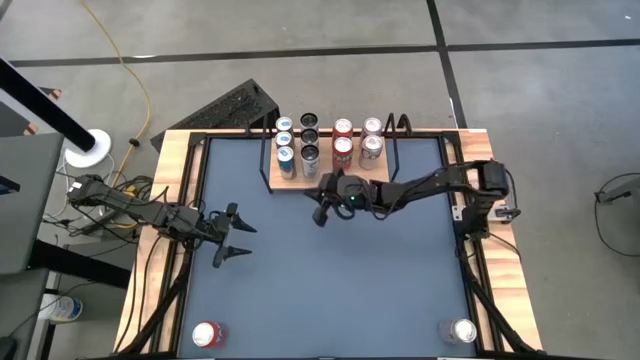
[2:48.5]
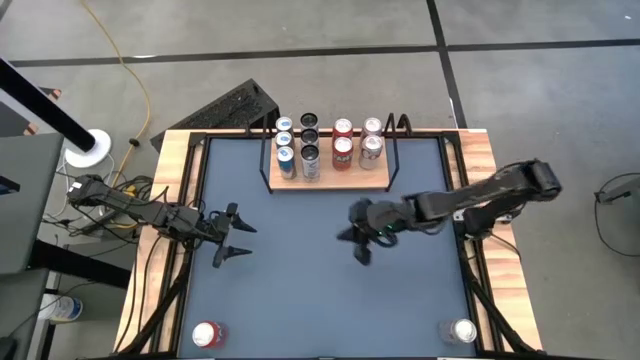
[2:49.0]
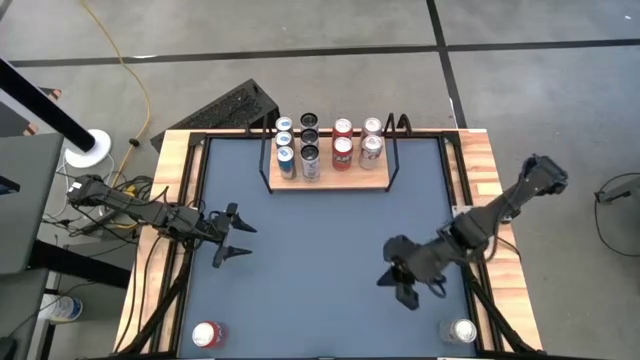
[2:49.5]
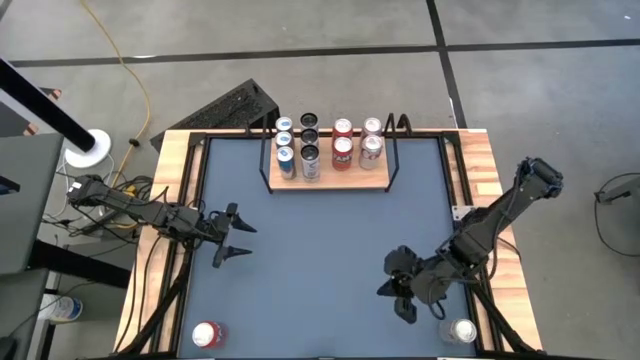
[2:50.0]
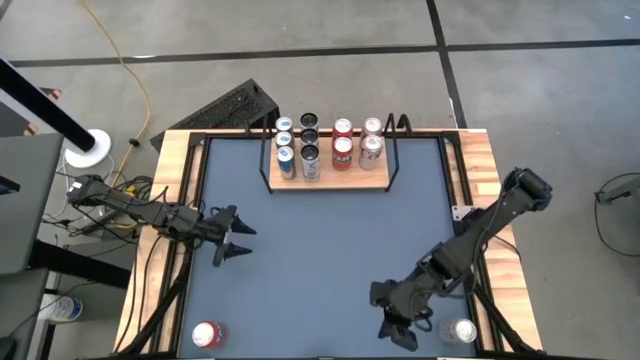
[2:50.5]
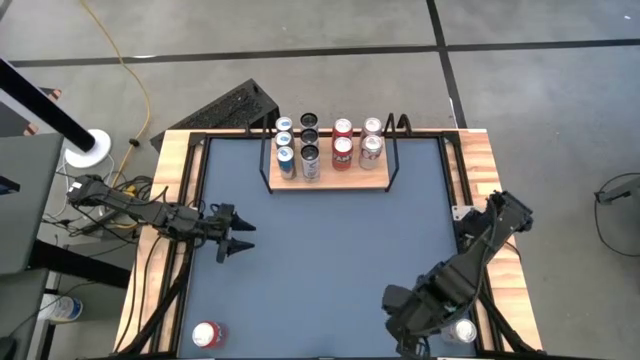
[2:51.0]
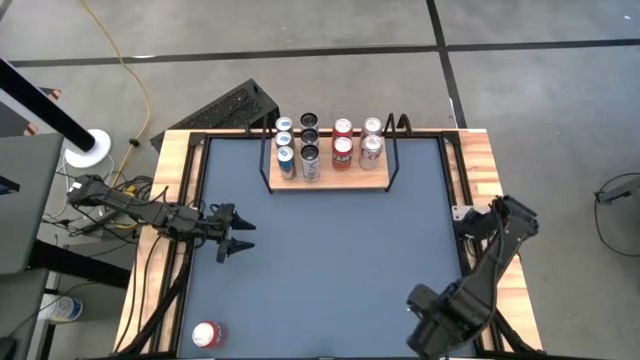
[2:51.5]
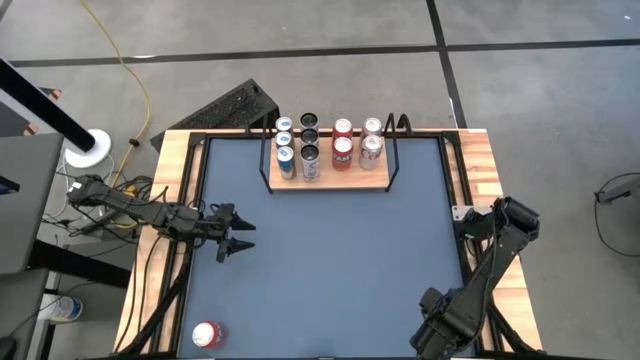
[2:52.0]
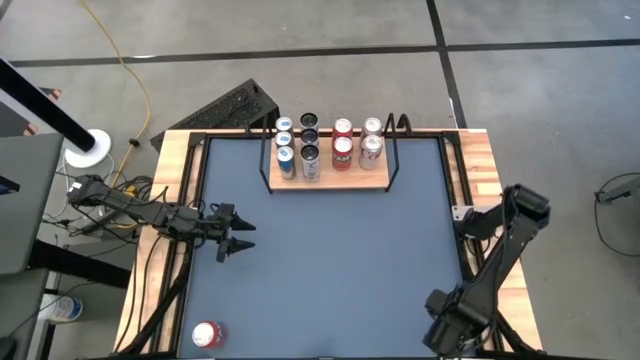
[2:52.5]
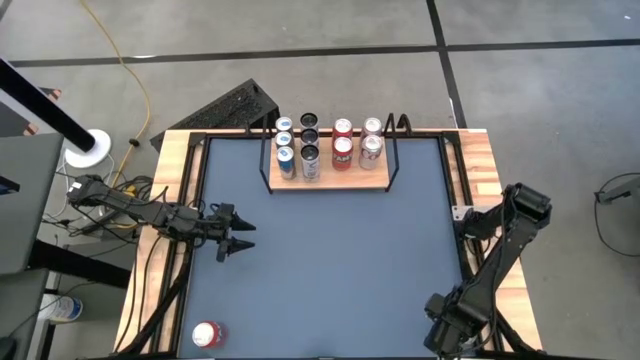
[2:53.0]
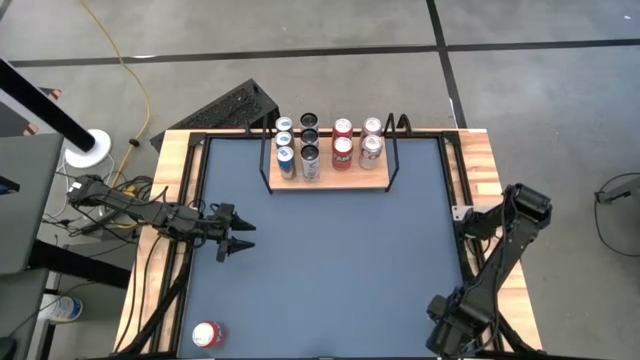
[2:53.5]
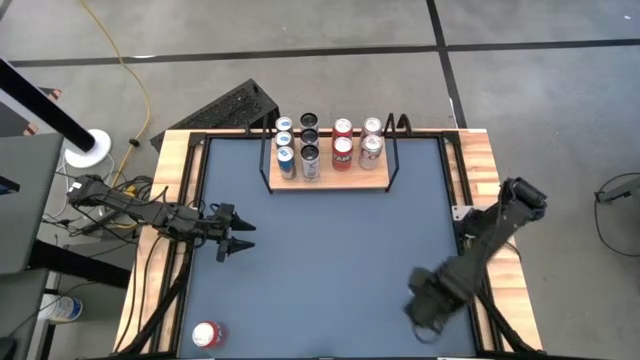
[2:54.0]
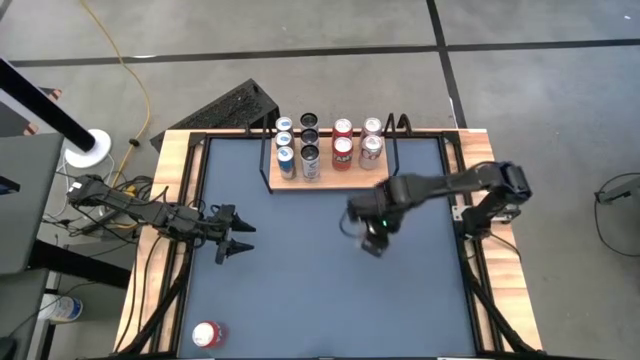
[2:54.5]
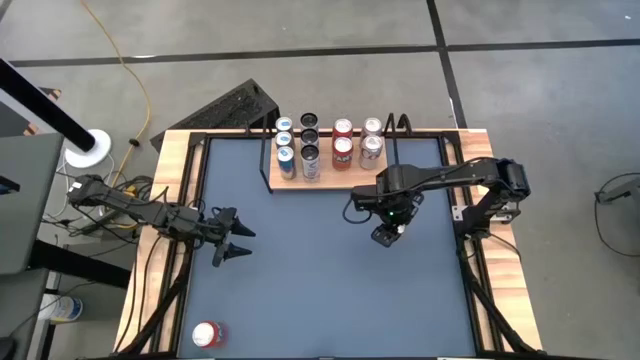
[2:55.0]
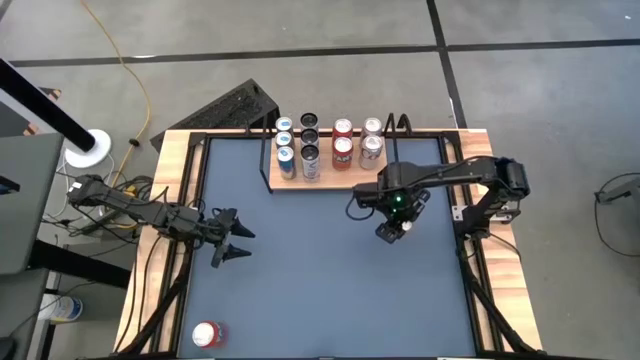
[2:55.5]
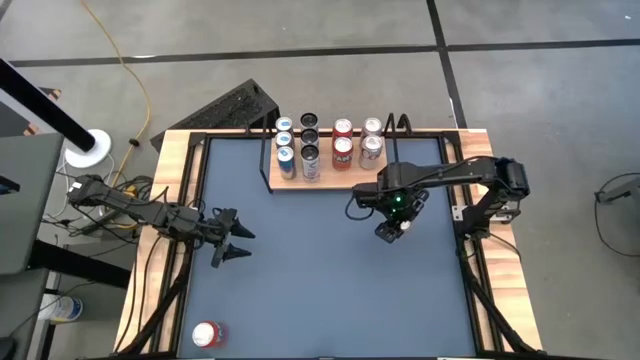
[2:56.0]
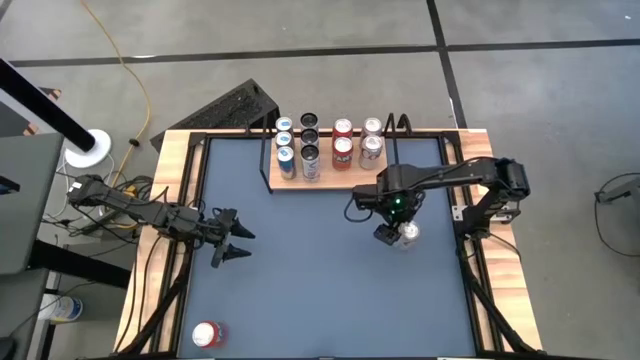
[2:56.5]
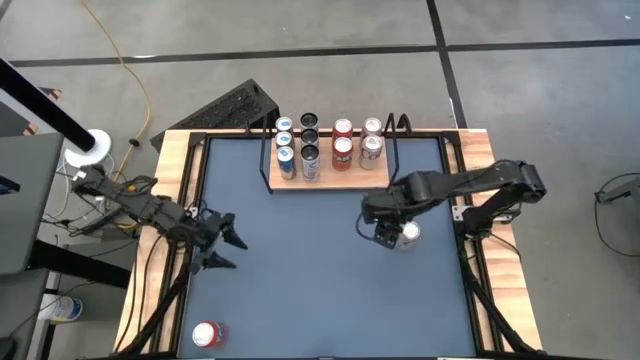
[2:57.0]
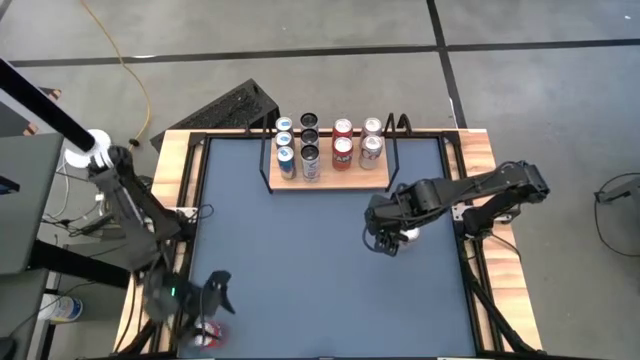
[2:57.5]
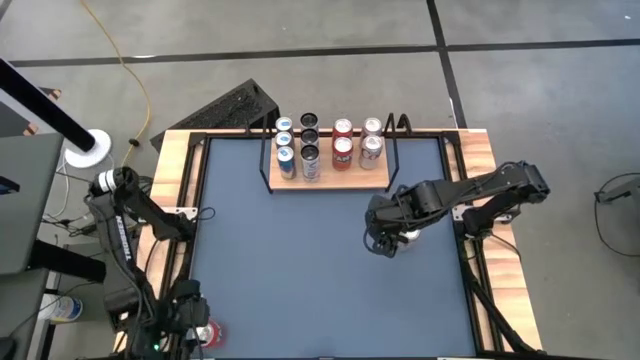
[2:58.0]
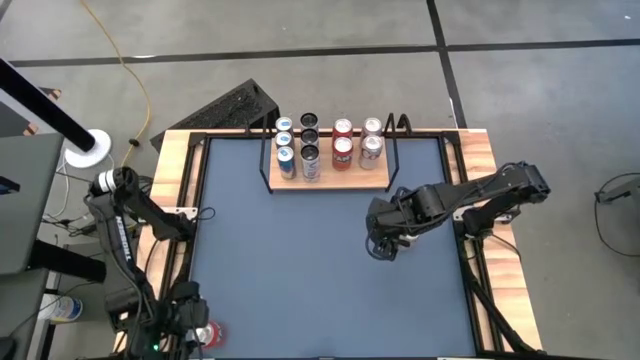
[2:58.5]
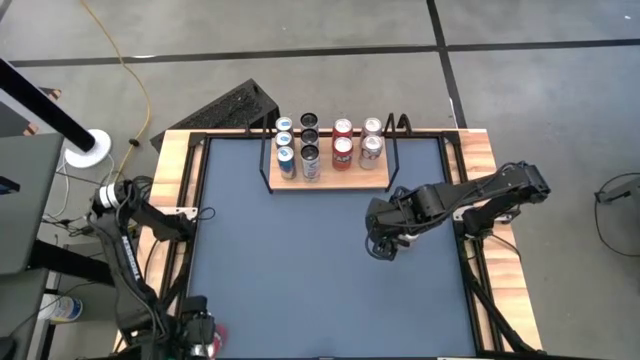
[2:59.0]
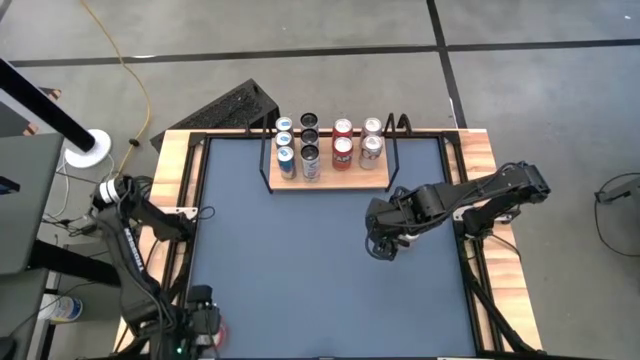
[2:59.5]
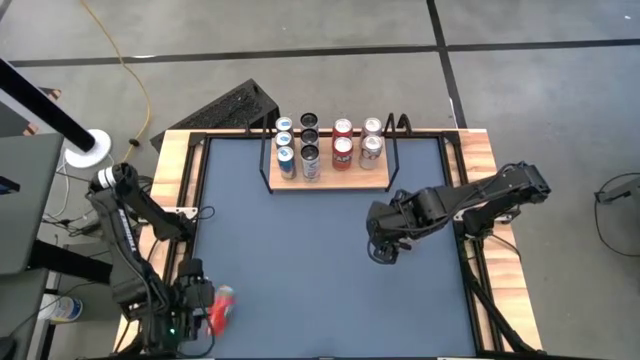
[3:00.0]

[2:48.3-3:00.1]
Task: Place canned beverage on shelf
Move the red-silver soda can

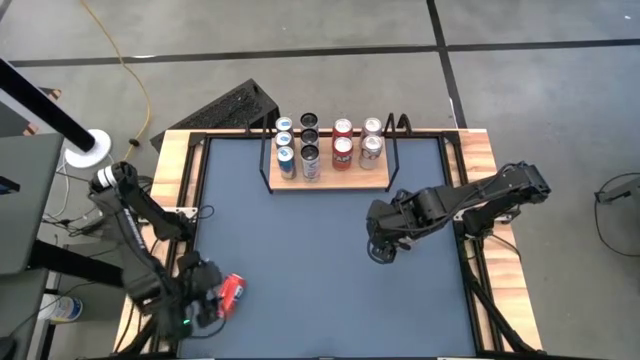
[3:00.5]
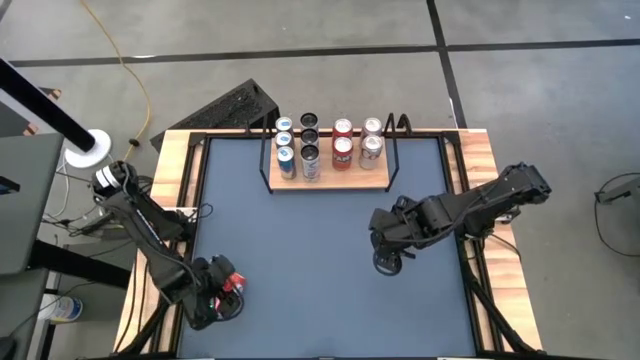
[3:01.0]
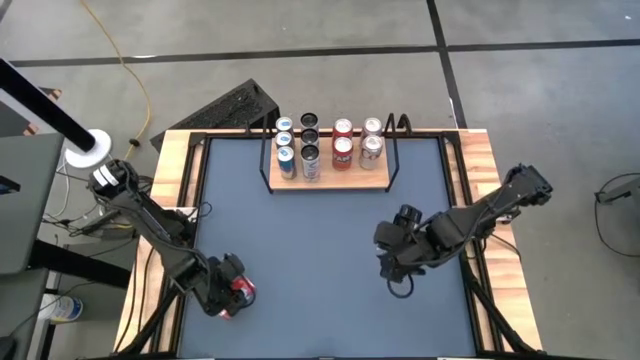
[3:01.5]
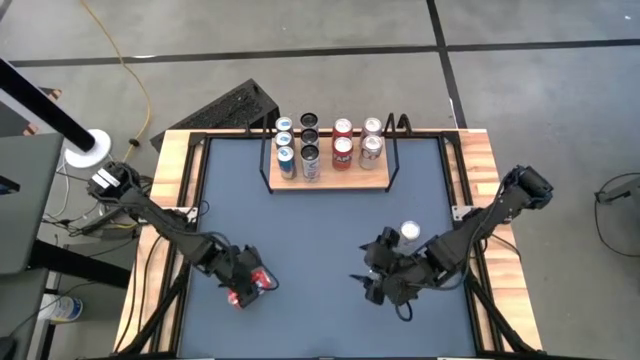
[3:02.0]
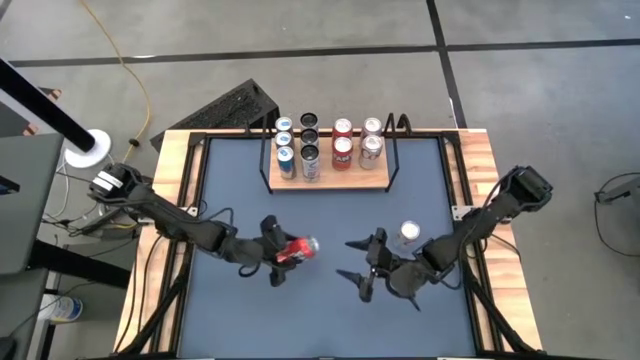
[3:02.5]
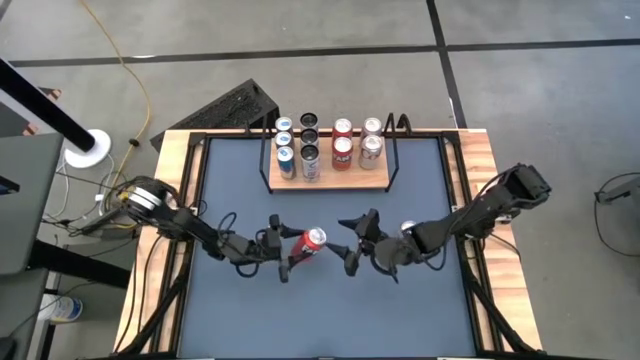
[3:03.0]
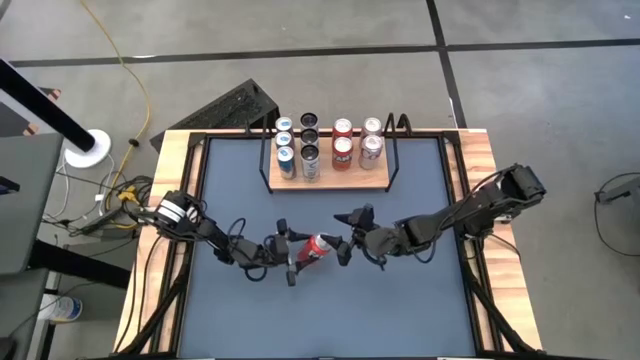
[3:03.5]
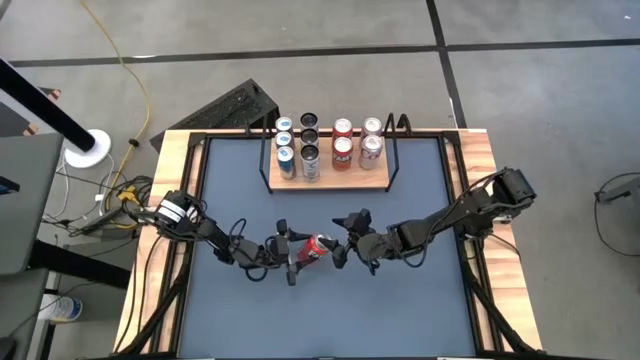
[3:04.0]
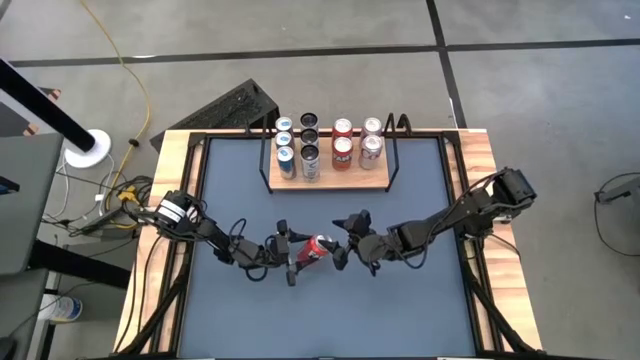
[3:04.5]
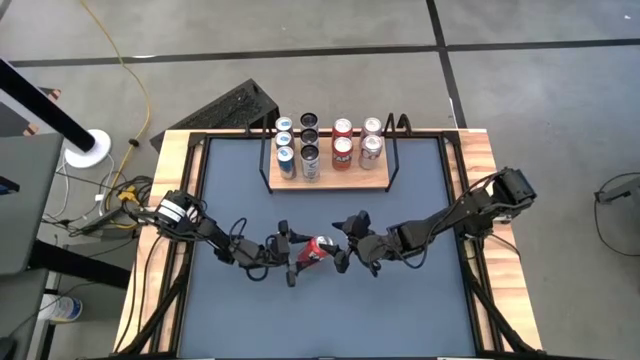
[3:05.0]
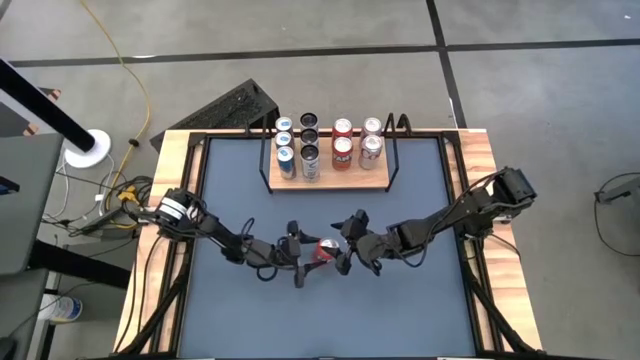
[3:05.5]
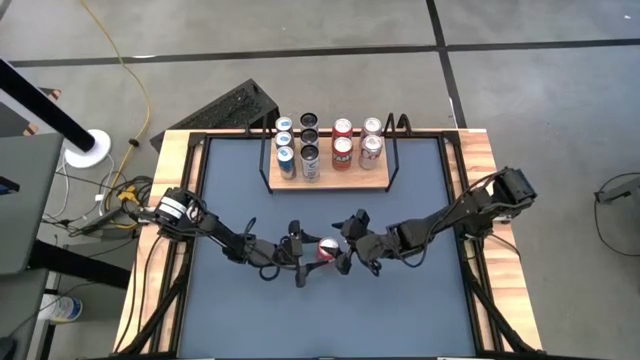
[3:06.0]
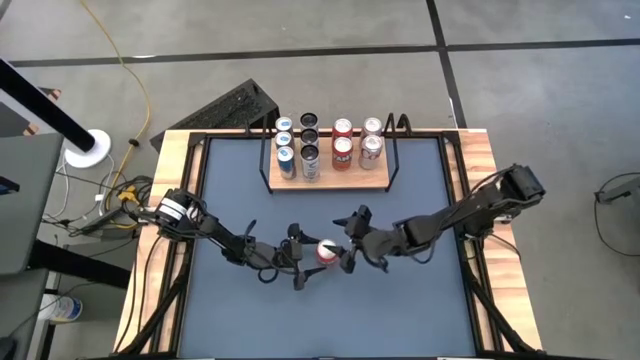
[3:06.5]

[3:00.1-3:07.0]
Move the orange soda can

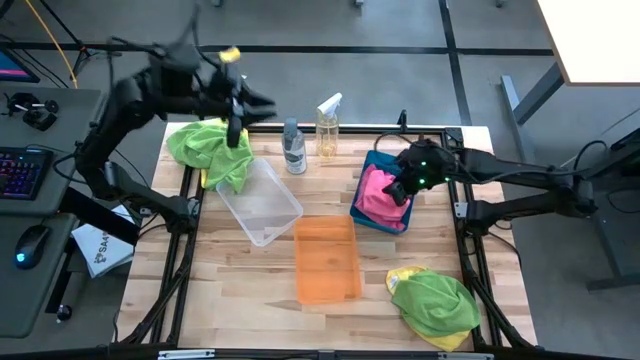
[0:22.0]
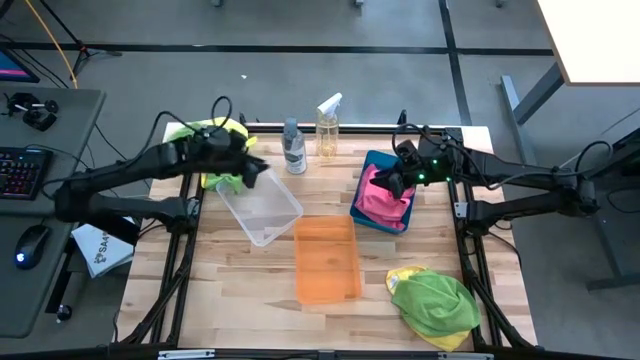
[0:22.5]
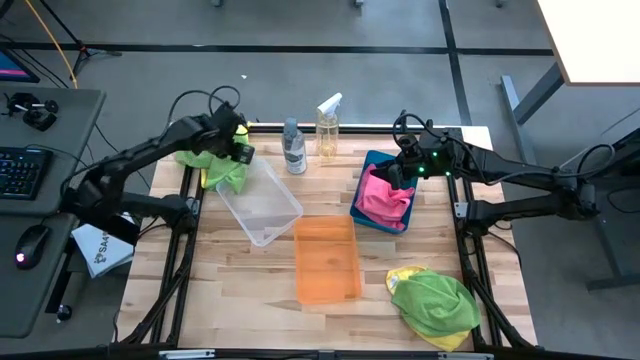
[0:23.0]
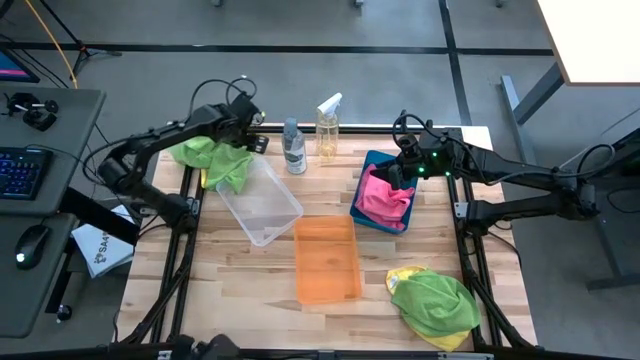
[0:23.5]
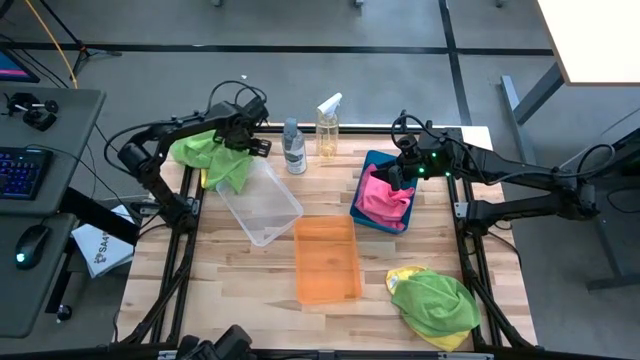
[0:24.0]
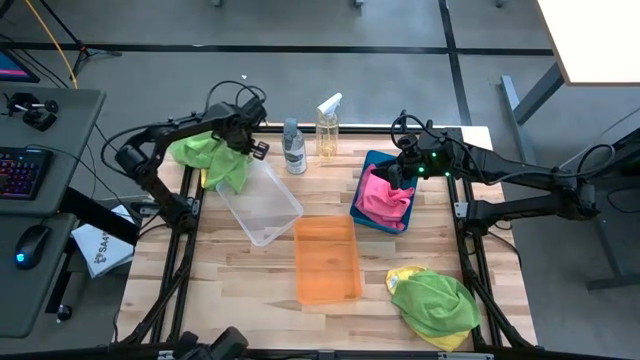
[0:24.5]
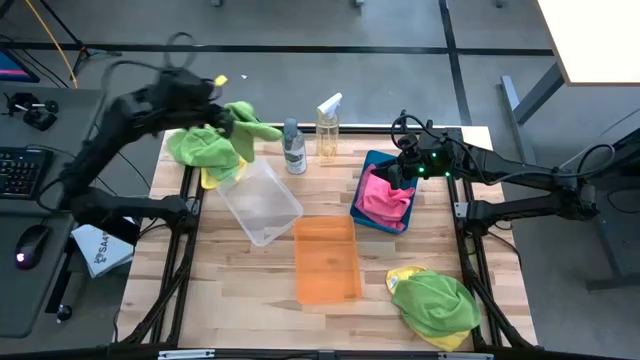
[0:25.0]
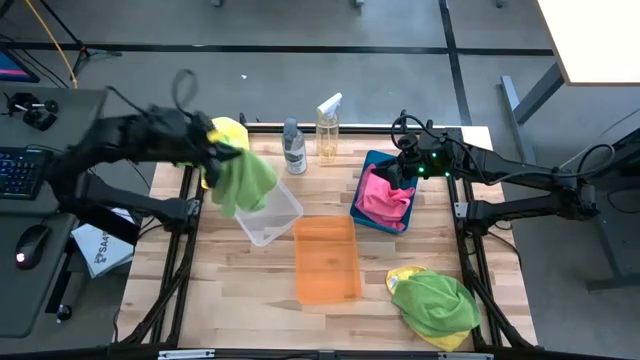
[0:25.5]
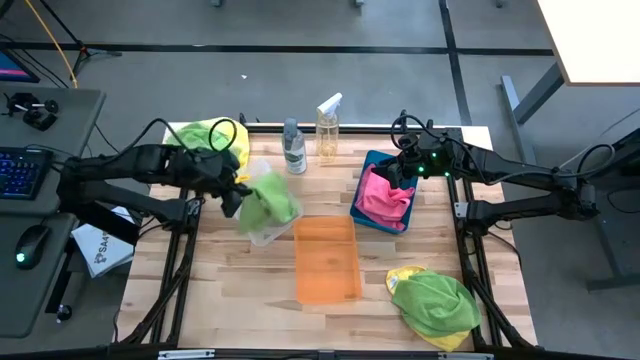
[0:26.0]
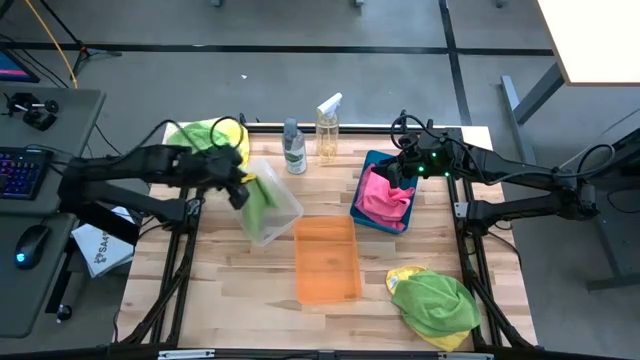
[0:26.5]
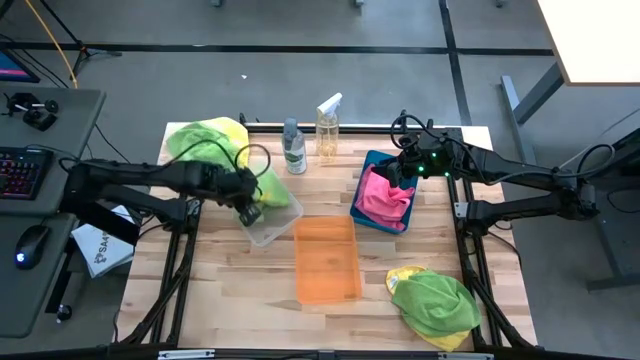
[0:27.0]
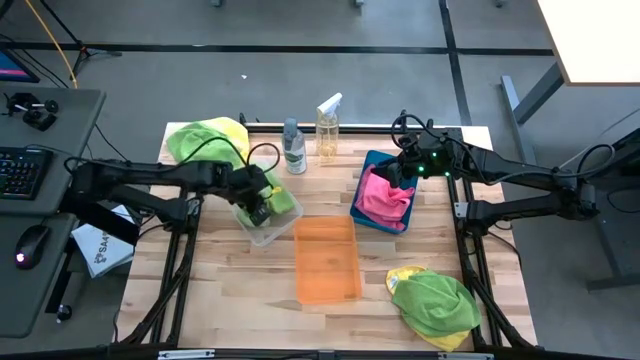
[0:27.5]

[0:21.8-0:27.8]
Task: Sort microfiber towel by color & place in baskets
Put the green microfiber towel into the transparent bin
